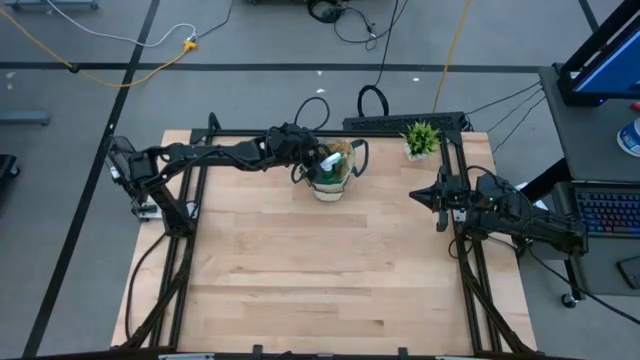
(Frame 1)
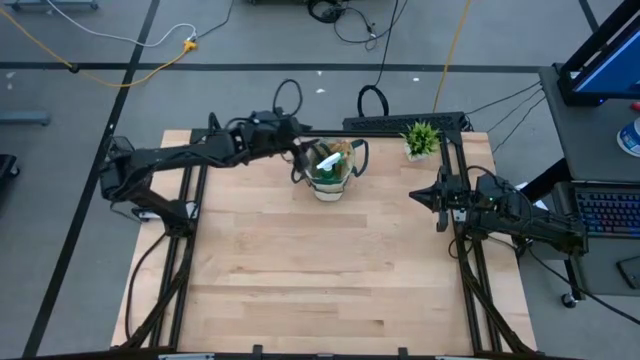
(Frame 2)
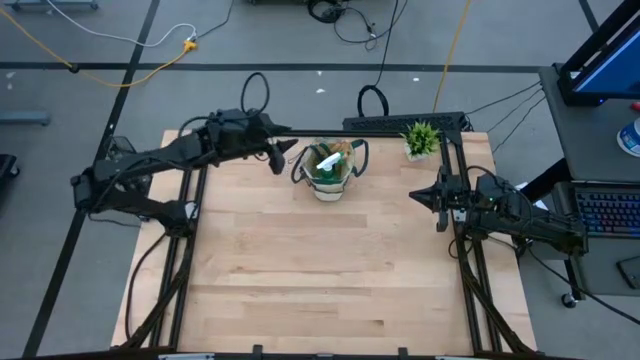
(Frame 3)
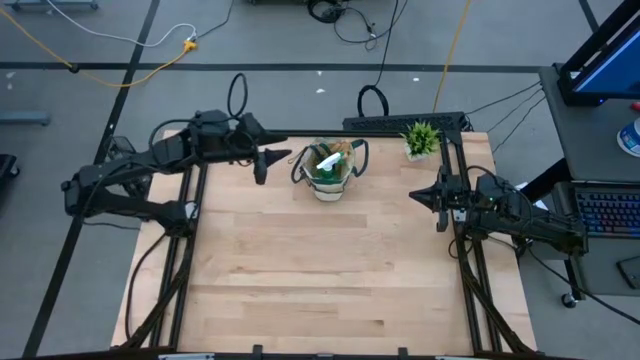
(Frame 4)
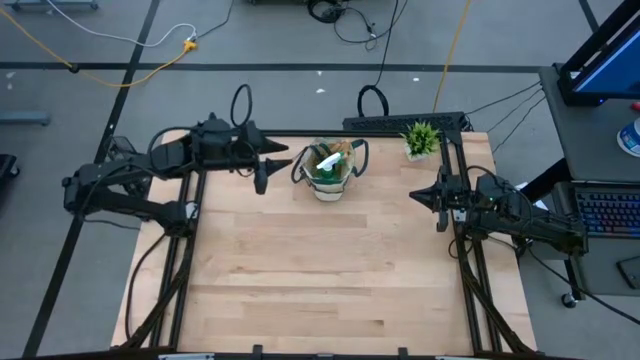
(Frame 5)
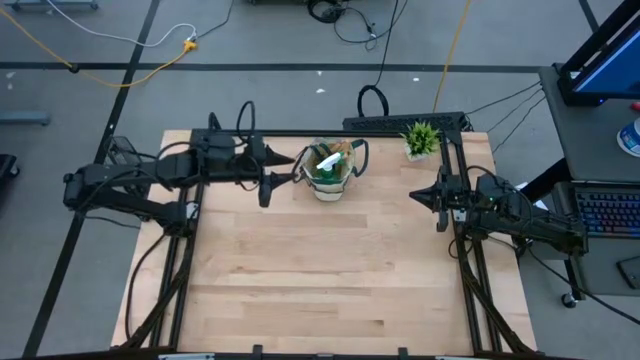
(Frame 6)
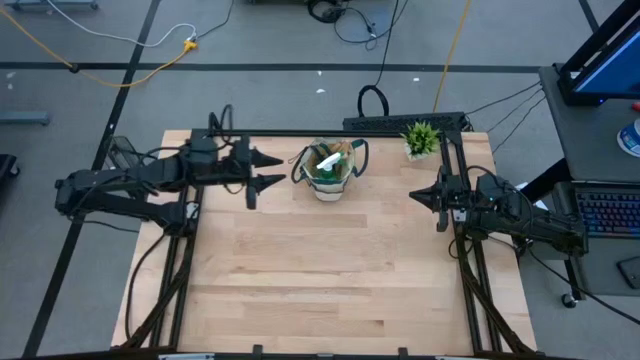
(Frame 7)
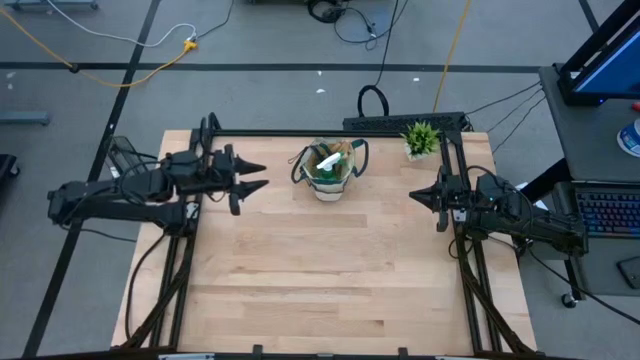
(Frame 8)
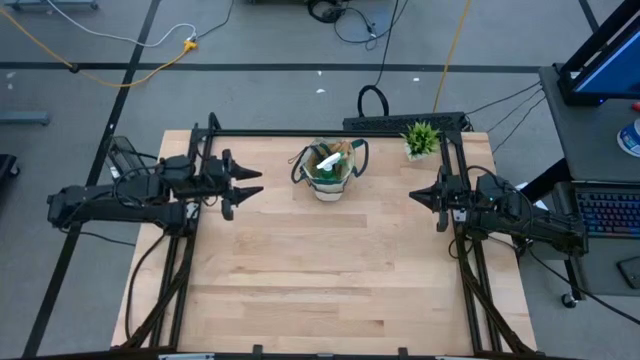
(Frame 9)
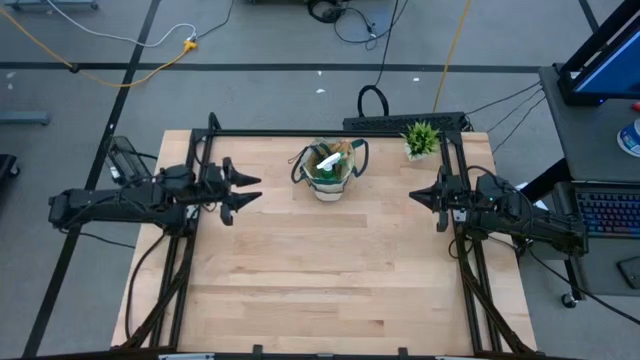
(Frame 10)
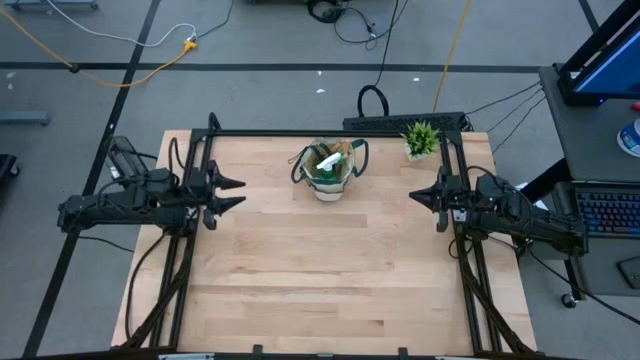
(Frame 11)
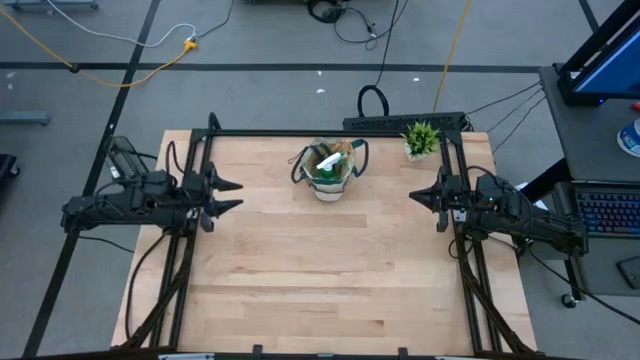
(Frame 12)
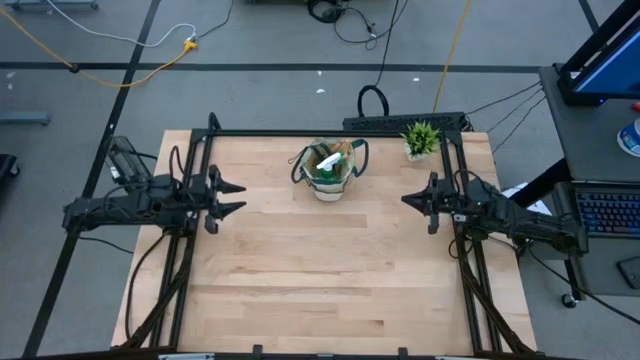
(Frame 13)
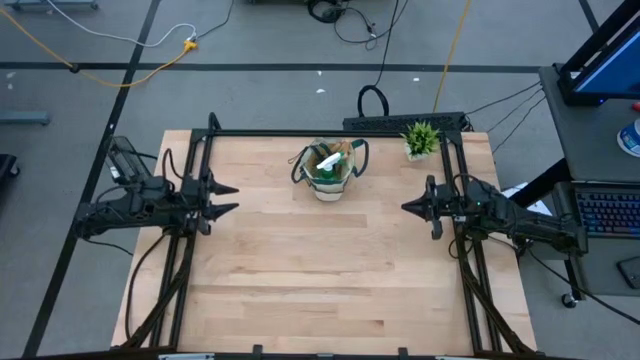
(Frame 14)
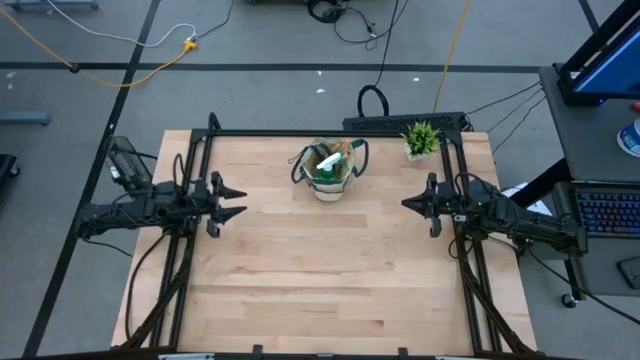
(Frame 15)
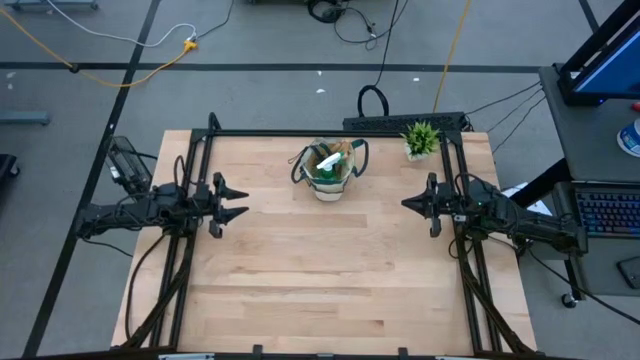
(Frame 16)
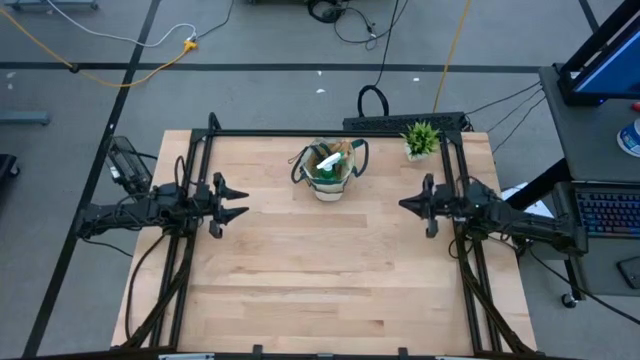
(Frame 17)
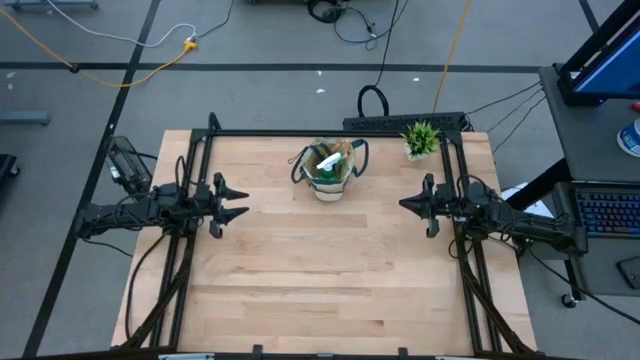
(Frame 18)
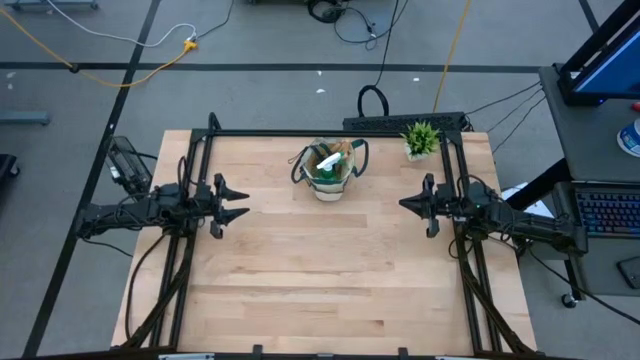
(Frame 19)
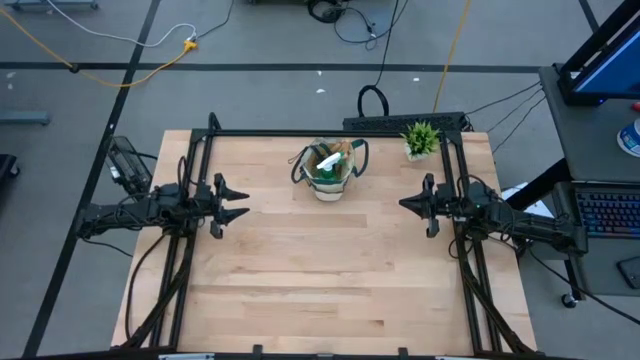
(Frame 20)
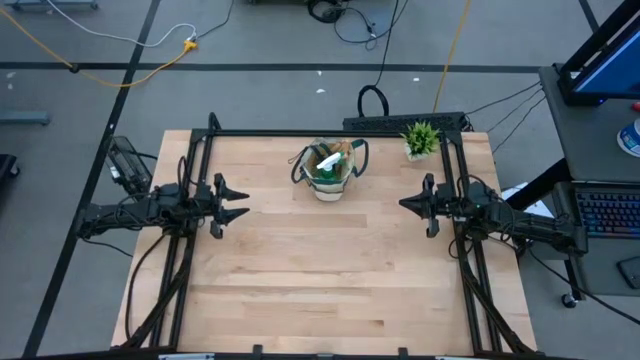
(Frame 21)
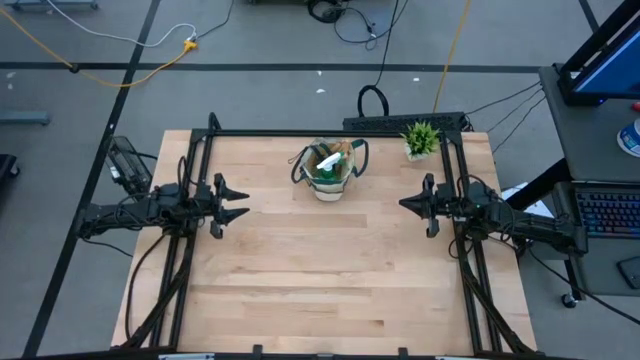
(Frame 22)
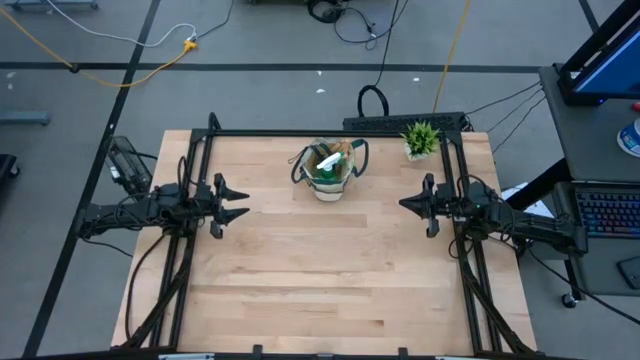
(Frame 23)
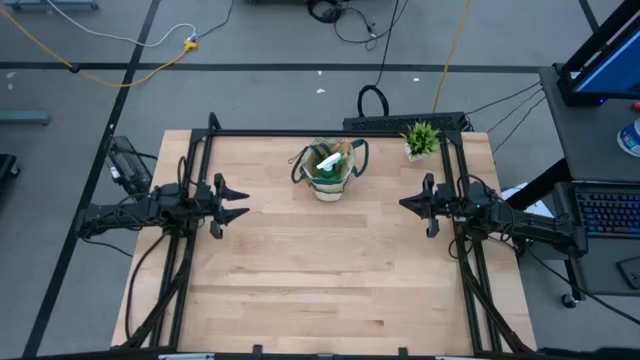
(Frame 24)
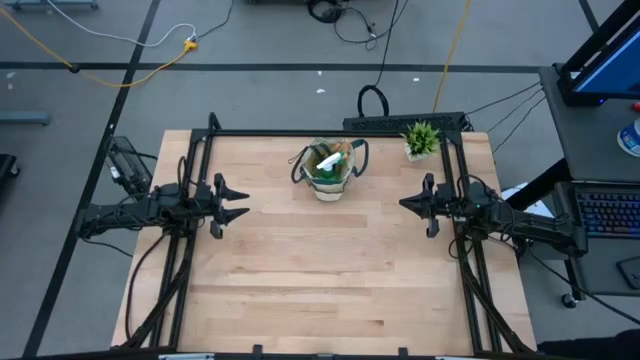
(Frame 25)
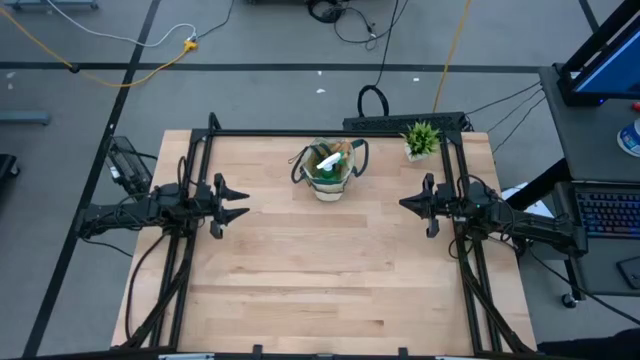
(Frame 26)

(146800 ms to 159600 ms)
Task: Pick & Place Garden tools in Gardening bag
Return to Home Position

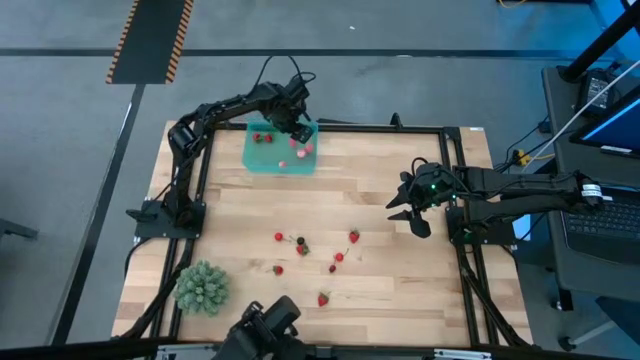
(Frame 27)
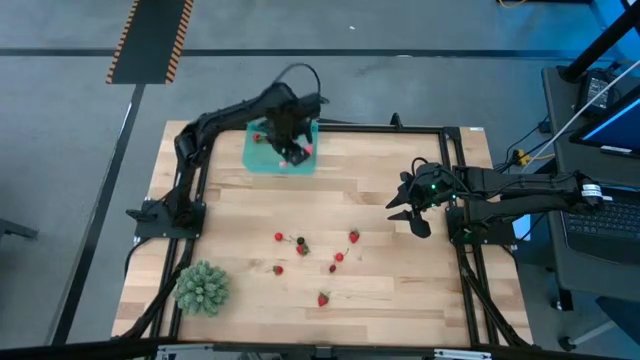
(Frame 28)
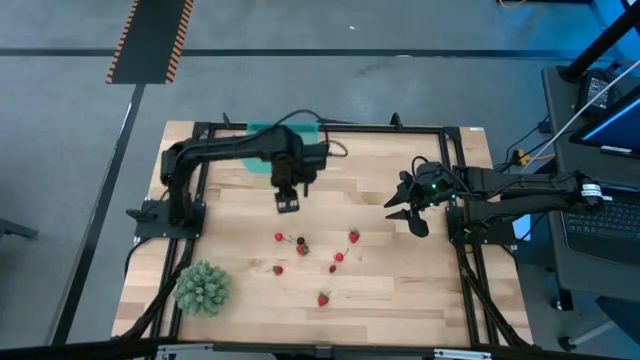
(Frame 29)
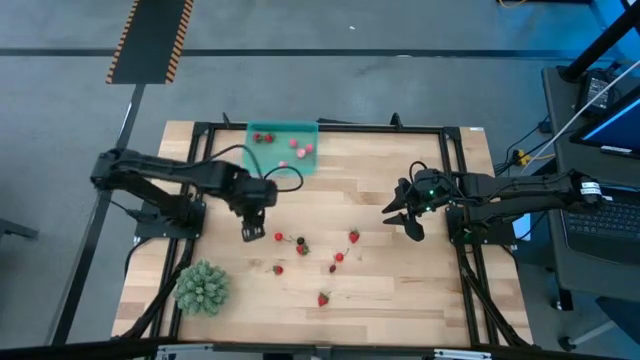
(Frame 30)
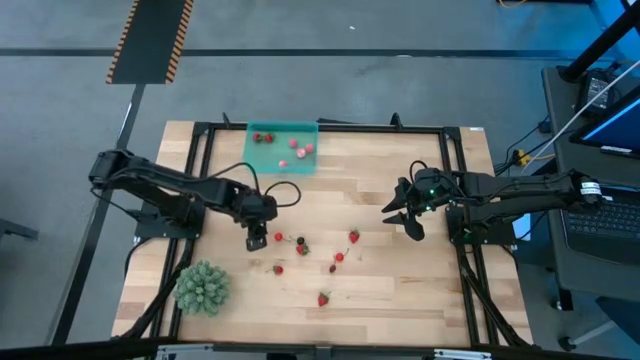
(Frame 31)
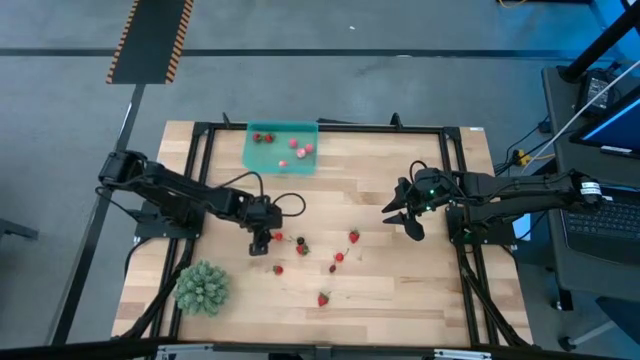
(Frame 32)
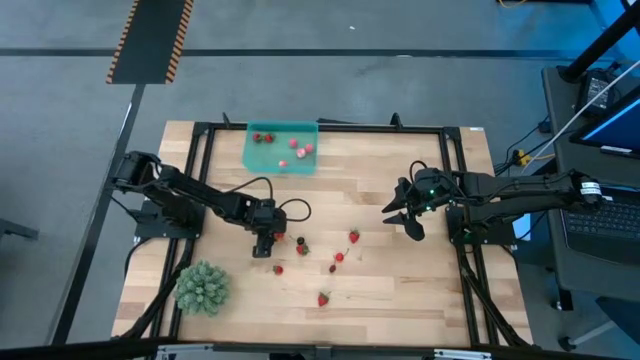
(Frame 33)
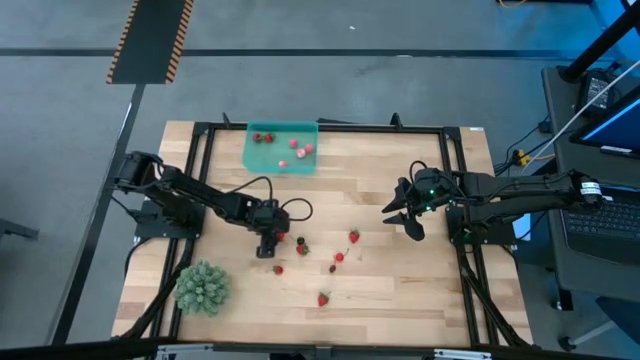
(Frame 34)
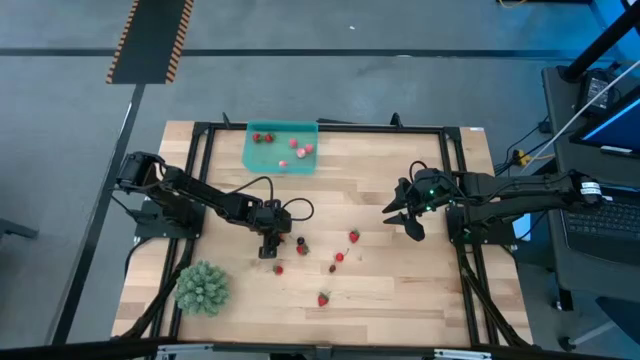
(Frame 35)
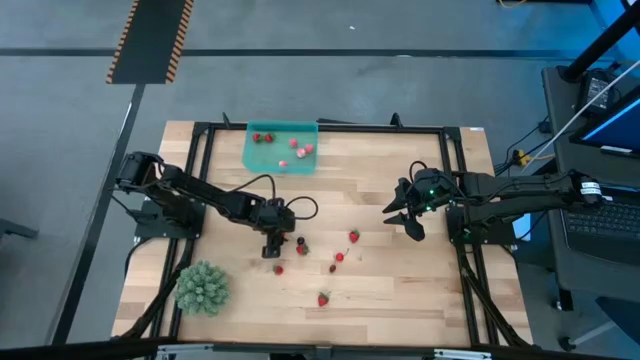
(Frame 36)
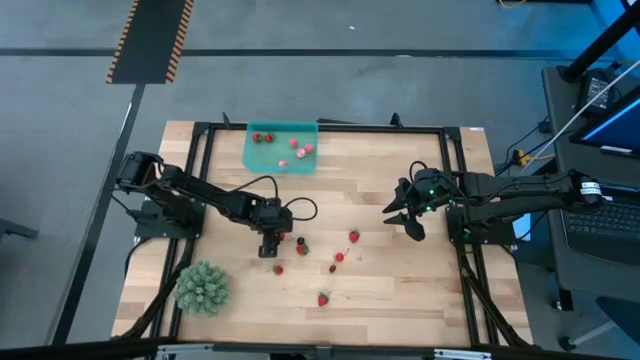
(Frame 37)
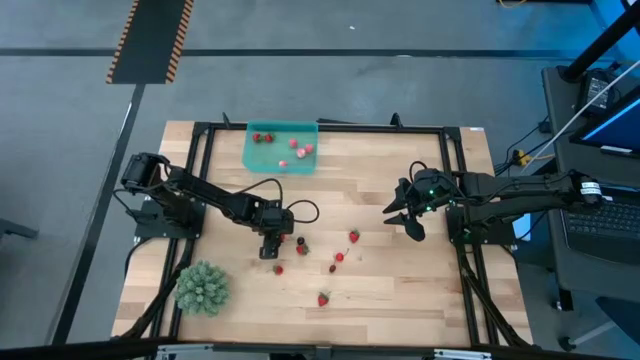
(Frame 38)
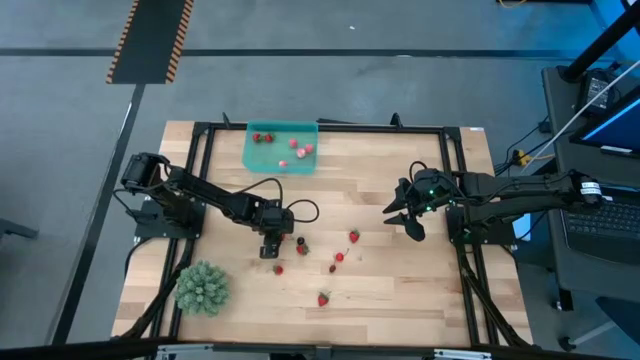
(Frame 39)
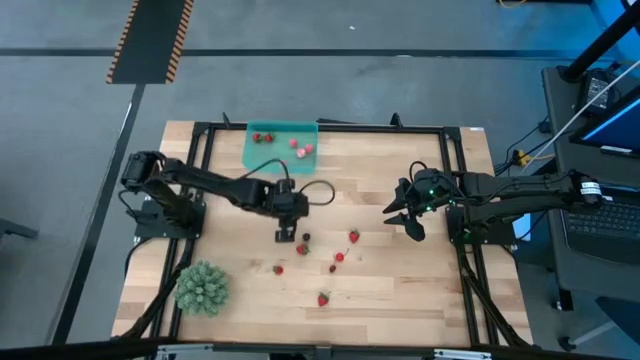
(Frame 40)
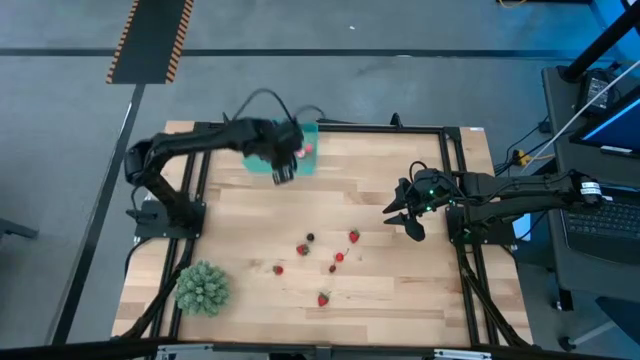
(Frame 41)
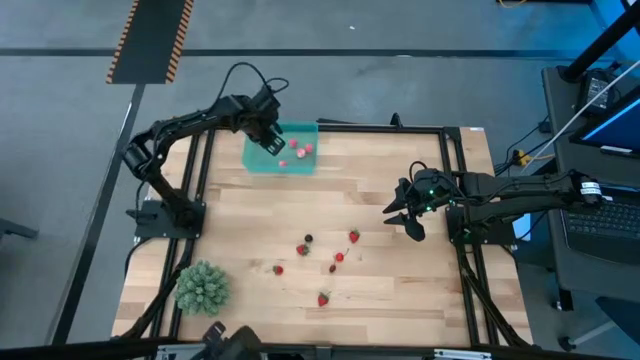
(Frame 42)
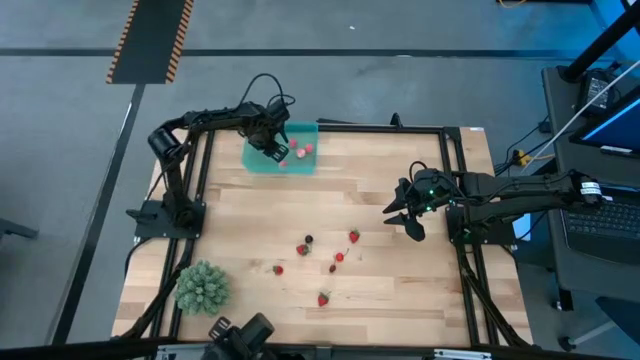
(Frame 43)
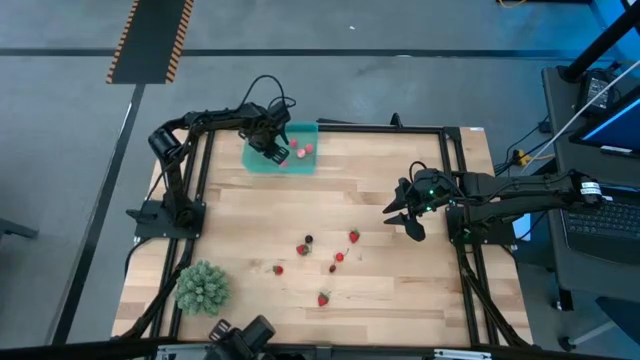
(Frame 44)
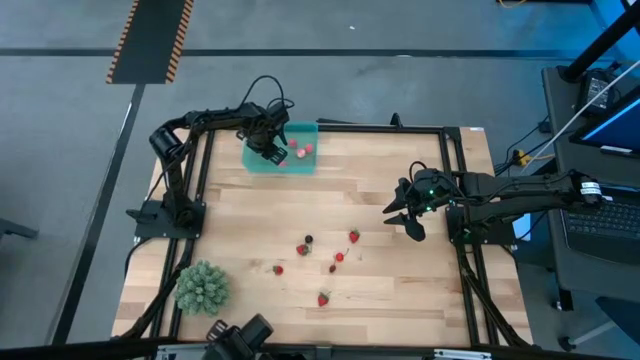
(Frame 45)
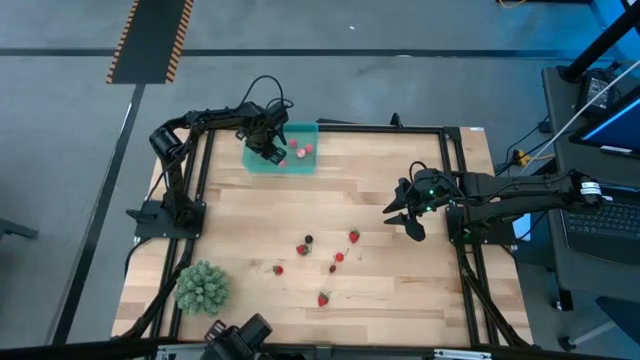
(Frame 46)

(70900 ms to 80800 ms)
Task: Pick and placing Produce into tupperware
Put the red cherry into the blue bin
